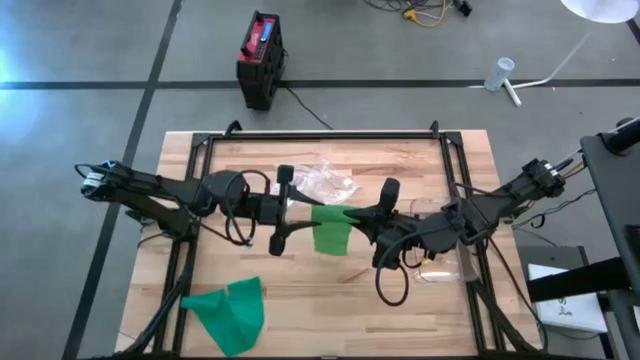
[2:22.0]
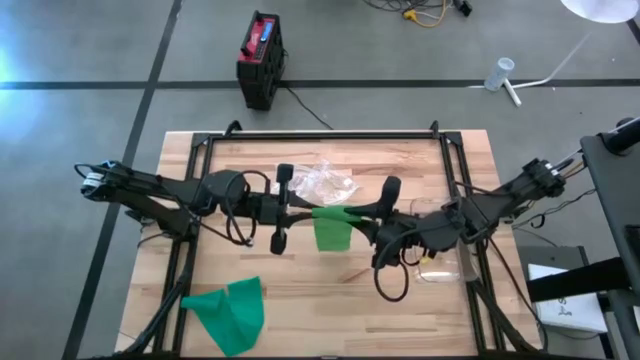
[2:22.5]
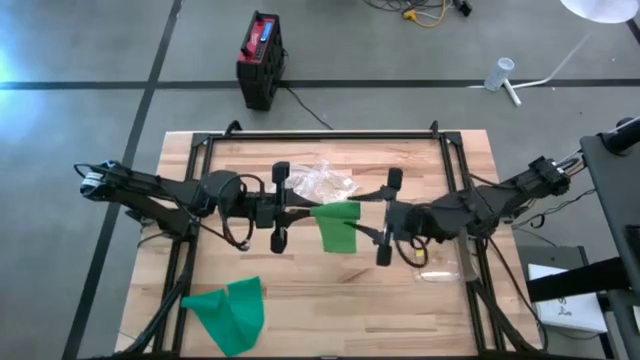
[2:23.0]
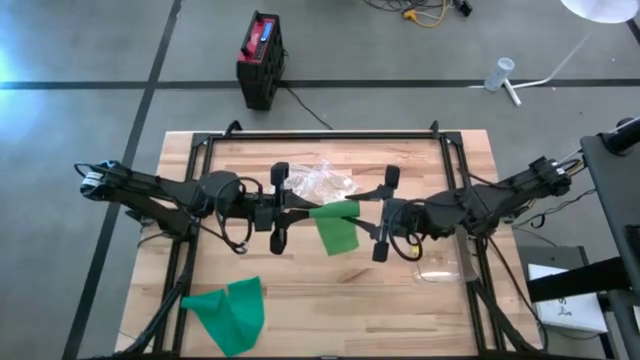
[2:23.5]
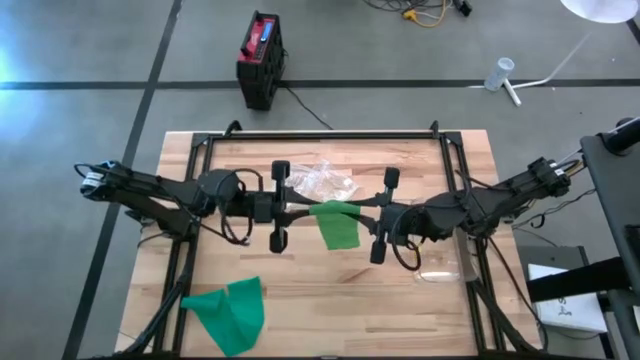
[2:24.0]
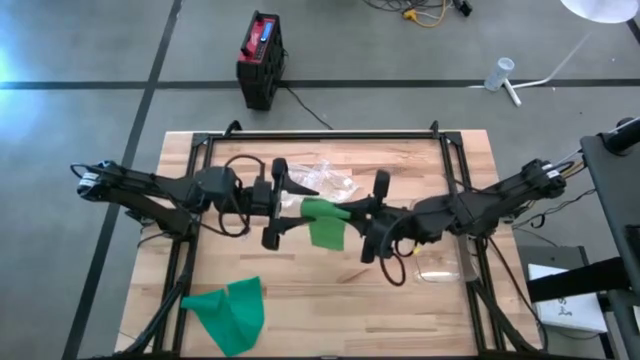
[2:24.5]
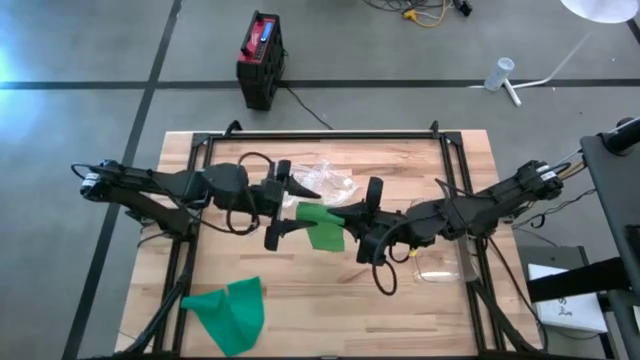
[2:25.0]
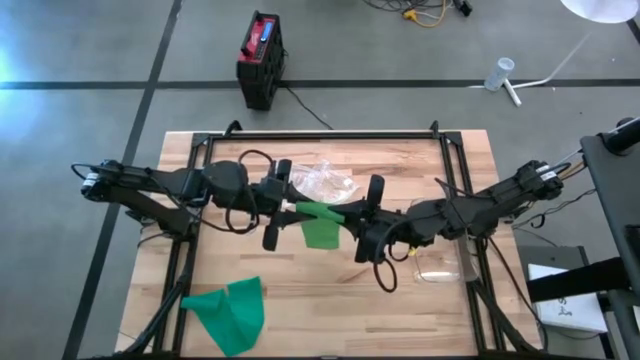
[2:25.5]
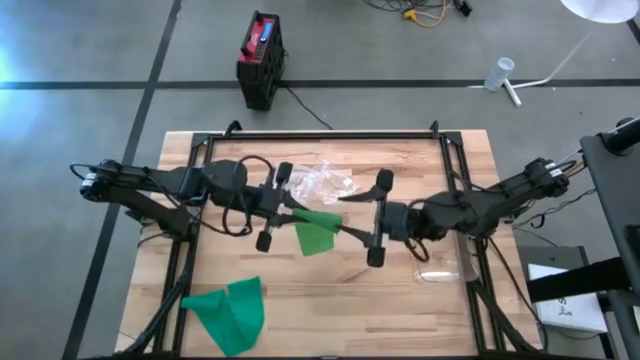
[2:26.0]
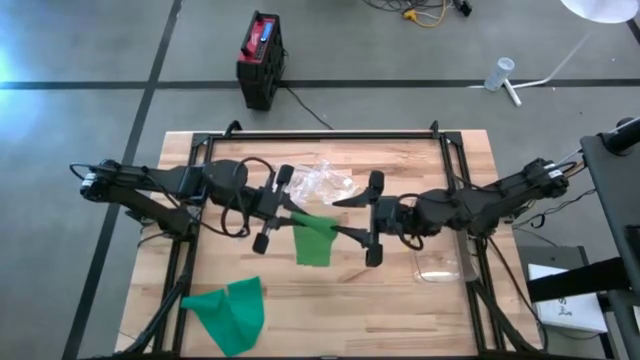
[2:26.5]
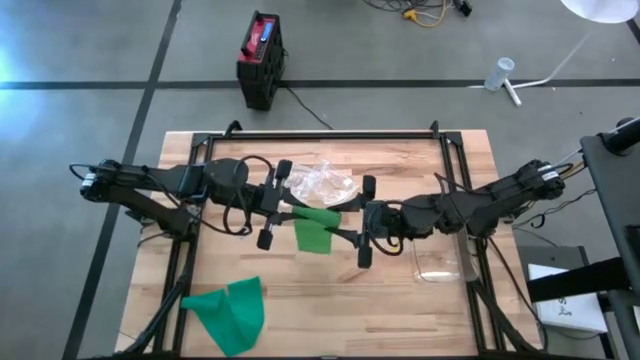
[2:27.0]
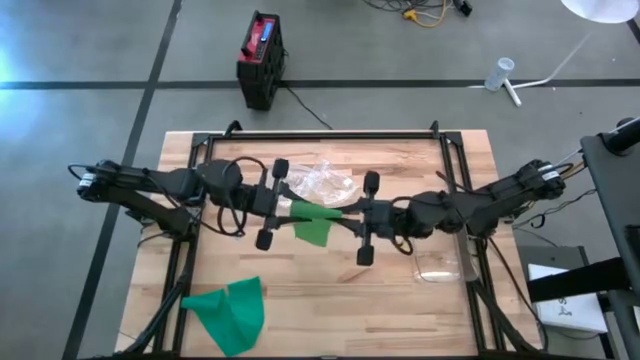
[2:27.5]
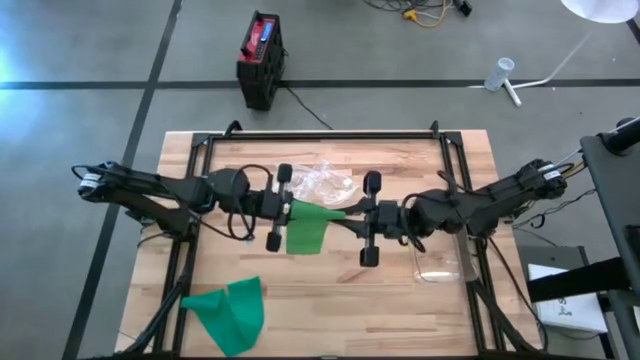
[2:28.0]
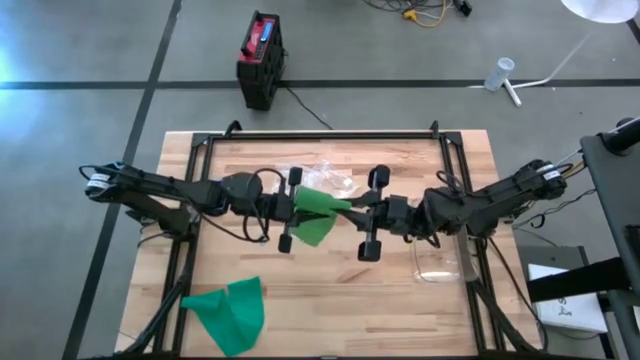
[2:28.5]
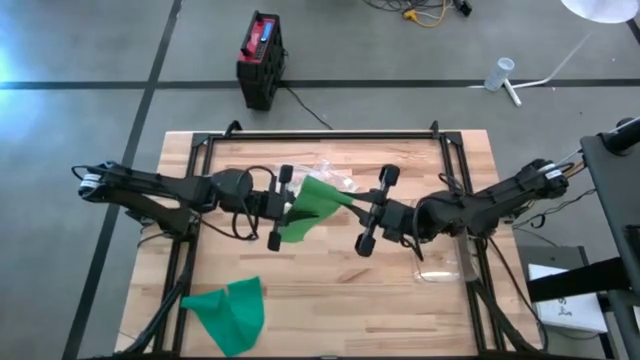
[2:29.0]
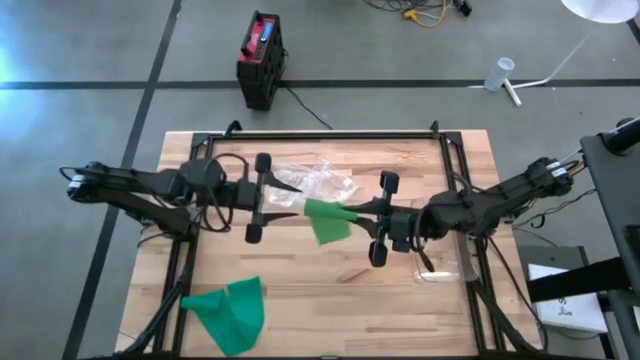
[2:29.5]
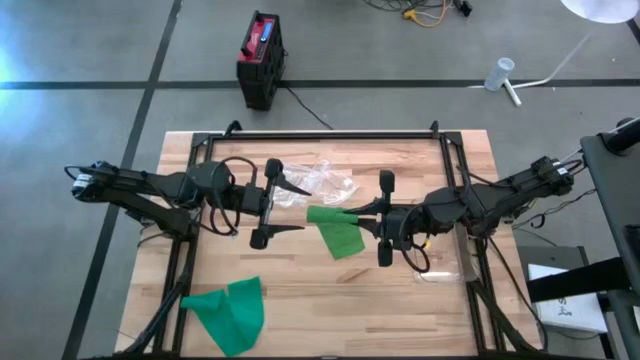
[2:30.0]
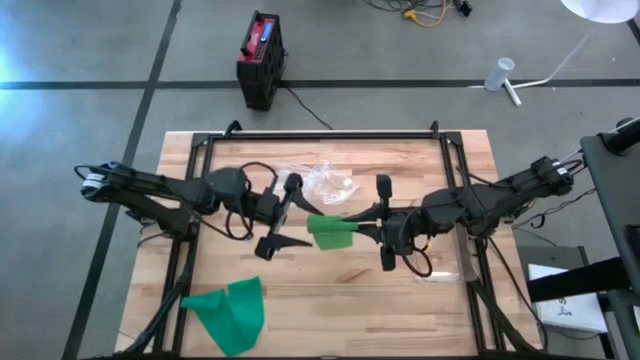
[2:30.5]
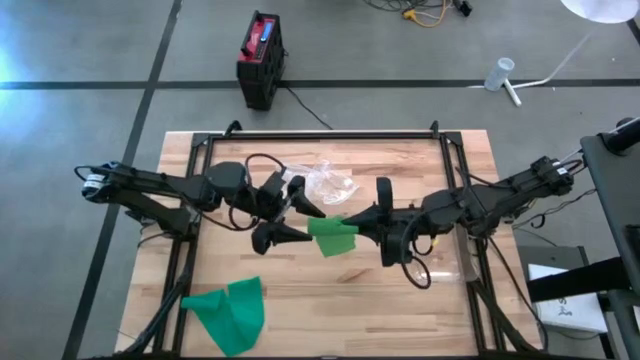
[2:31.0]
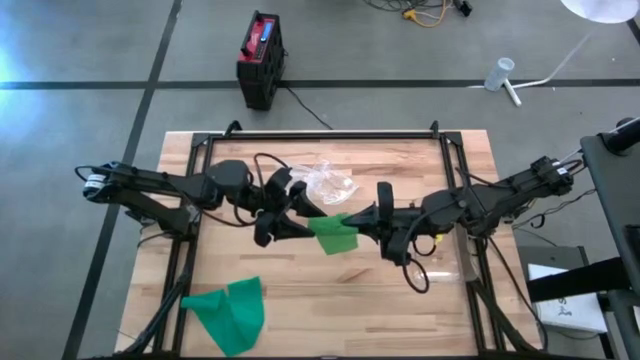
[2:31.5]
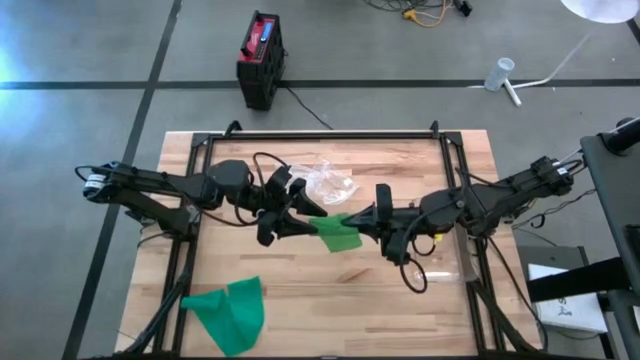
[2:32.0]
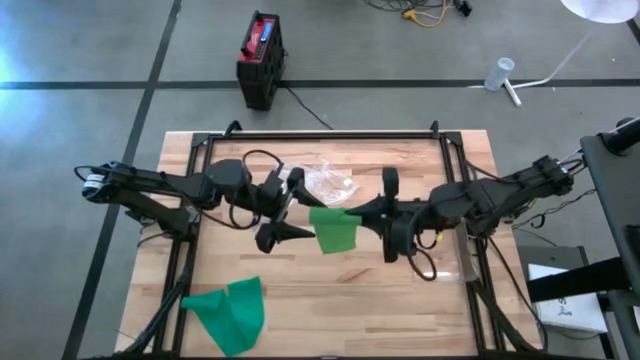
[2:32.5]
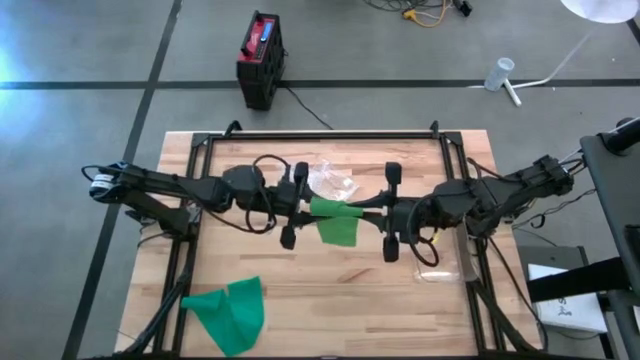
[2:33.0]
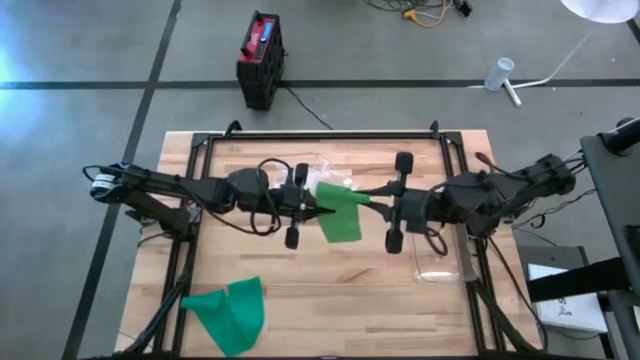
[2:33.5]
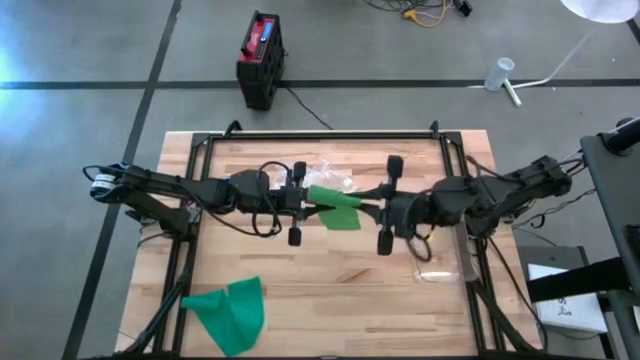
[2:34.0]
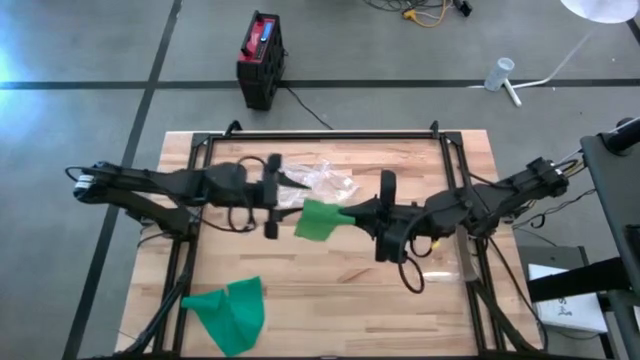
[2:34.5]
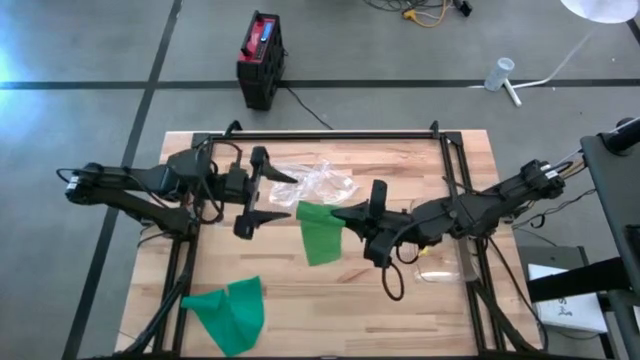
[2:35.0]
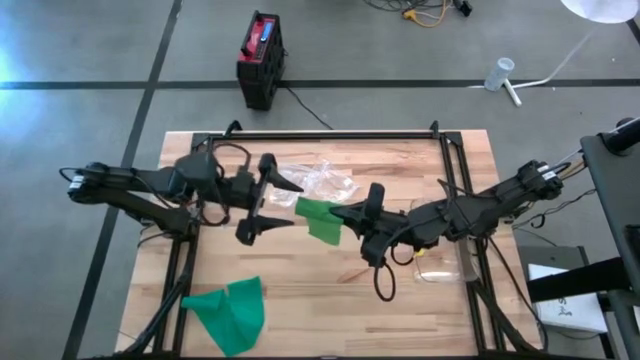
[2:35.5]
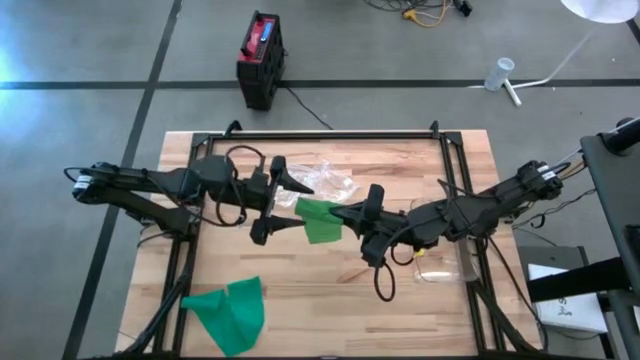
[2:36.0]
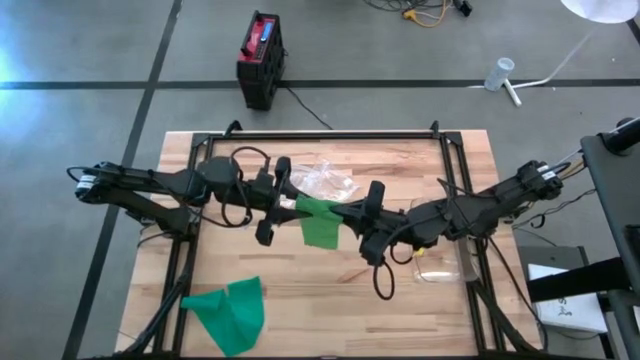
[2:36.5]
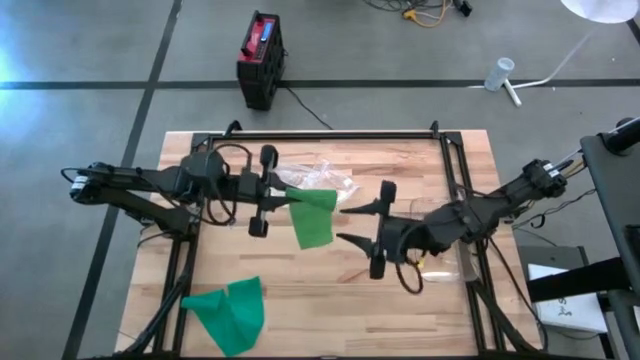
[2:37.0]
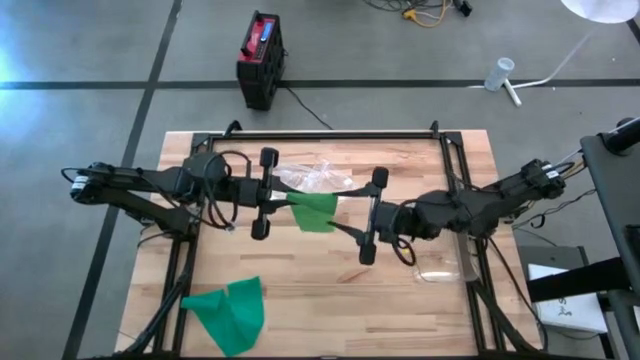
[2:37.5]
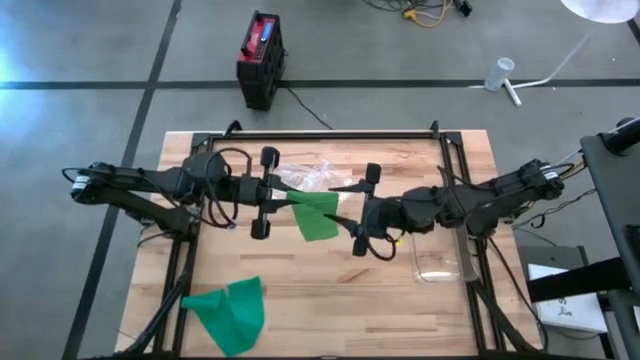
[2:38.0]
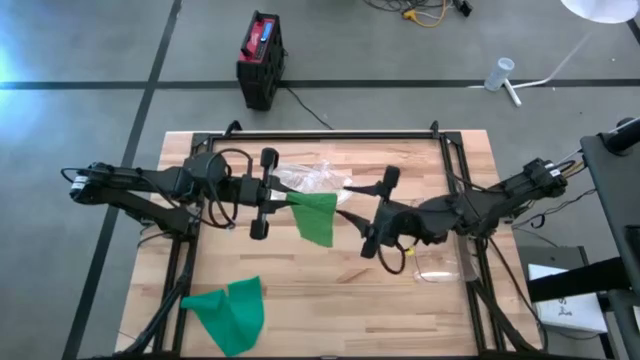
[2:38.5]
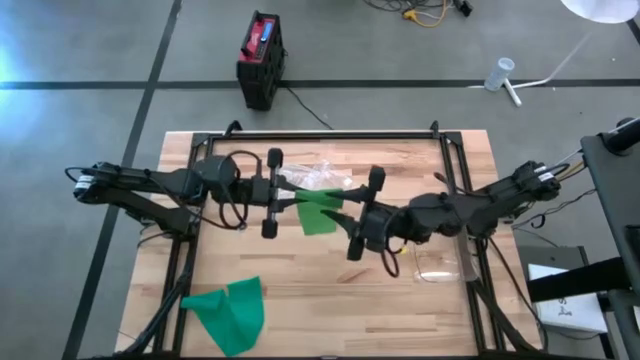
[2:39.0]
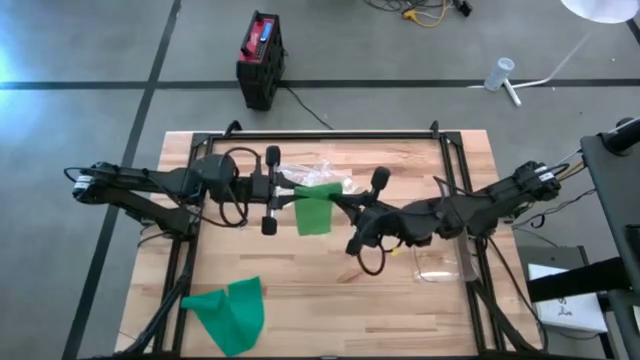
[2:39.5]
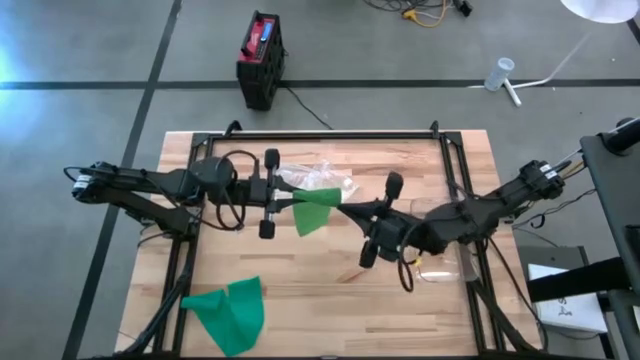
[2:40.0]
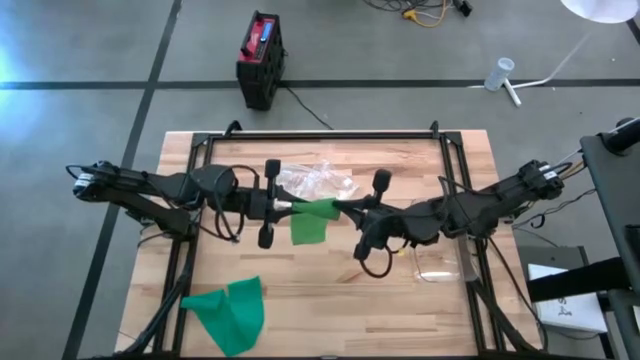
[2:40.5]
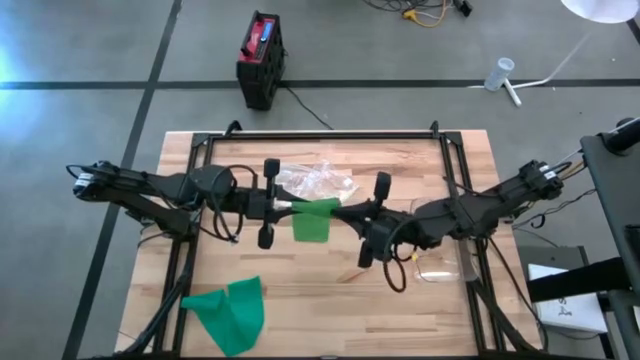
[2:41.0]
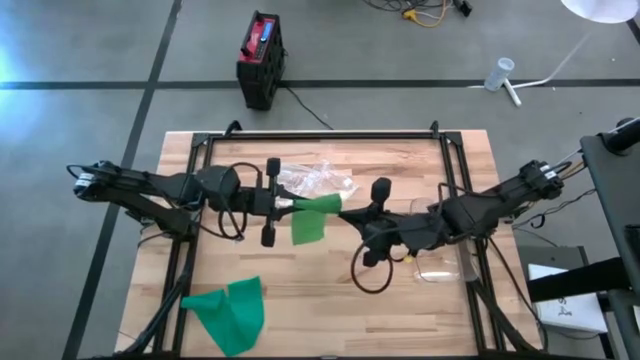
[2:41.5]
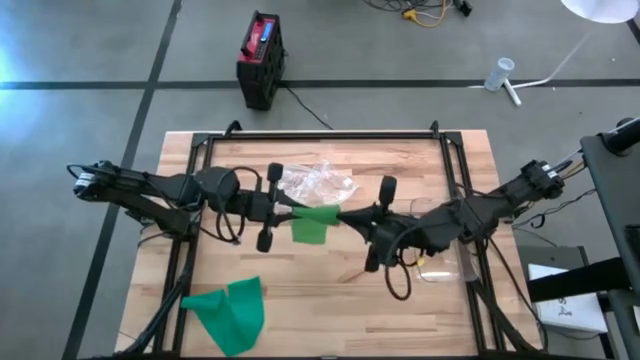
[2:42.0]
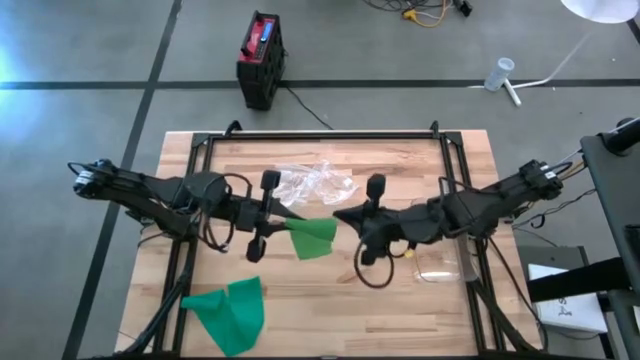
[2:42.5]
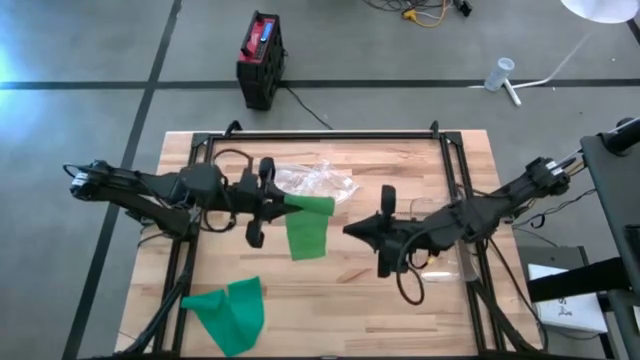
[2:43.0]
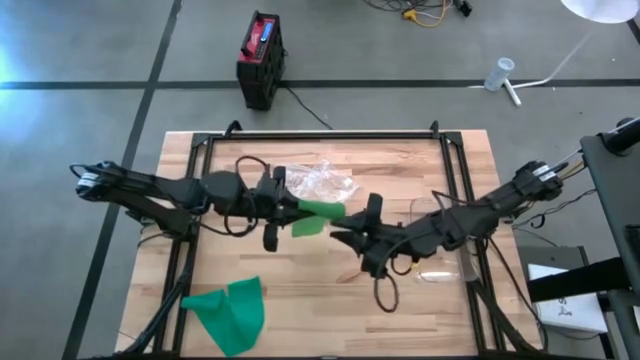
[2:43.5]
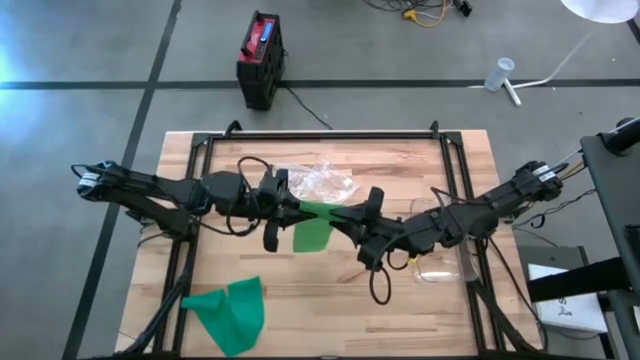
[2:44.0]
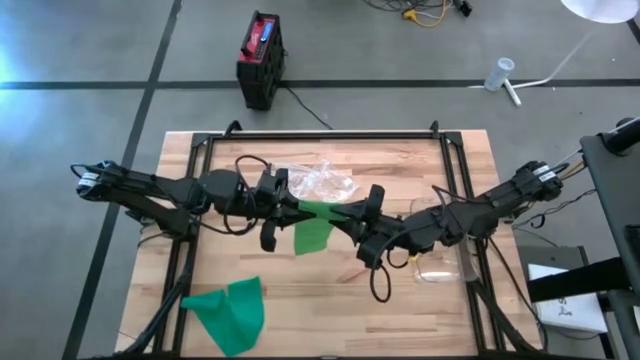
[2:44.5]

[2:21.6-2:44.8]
Task: Roll bandage
Roll the green bandage
